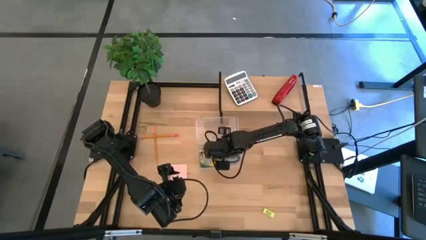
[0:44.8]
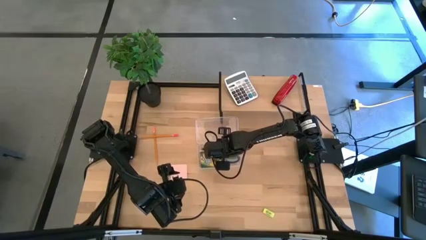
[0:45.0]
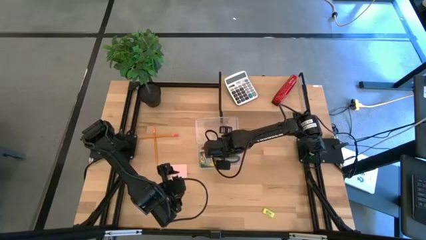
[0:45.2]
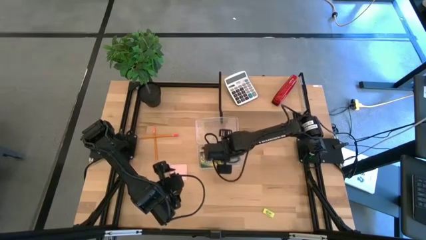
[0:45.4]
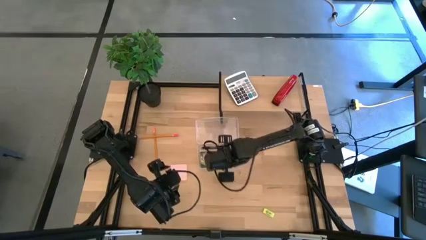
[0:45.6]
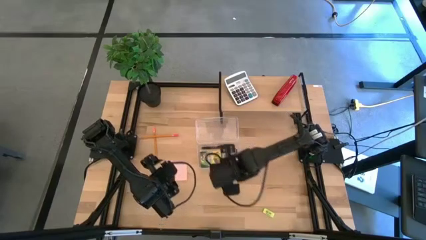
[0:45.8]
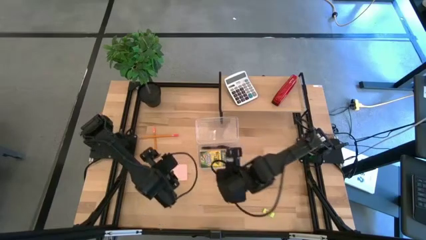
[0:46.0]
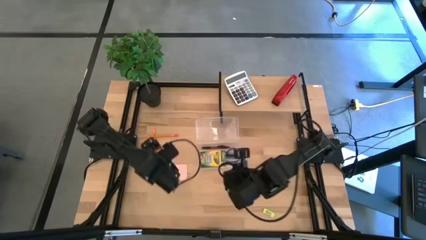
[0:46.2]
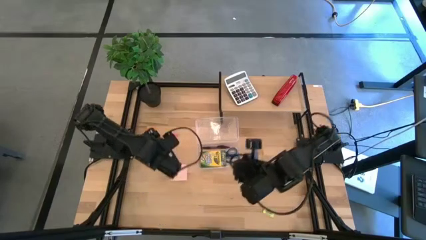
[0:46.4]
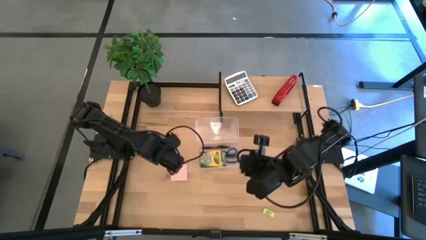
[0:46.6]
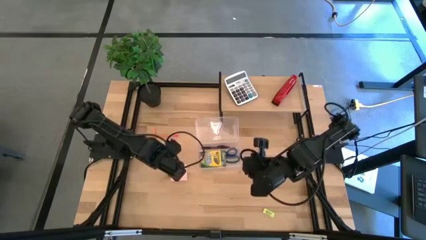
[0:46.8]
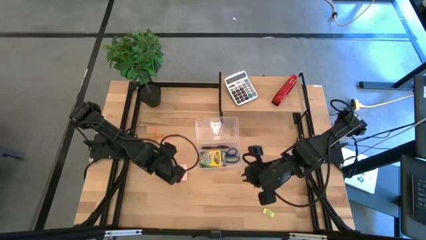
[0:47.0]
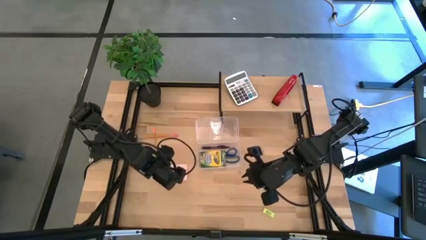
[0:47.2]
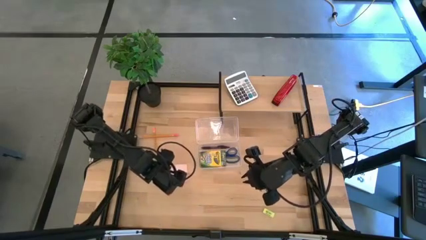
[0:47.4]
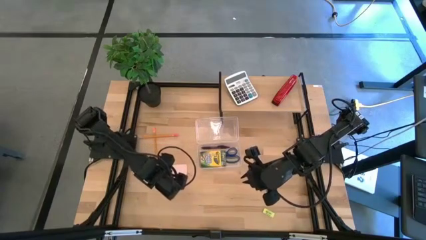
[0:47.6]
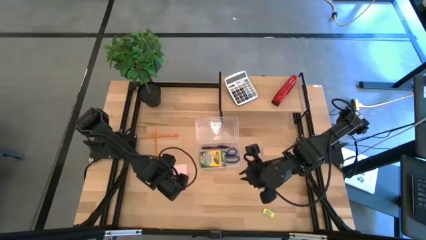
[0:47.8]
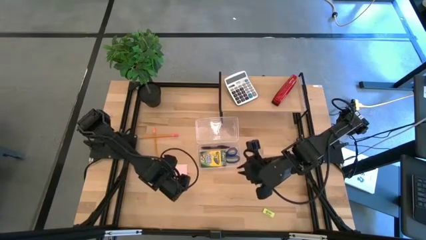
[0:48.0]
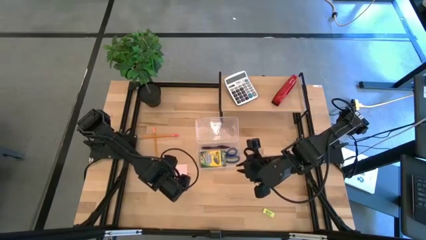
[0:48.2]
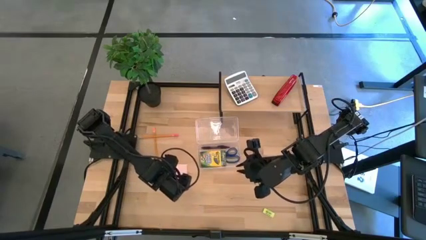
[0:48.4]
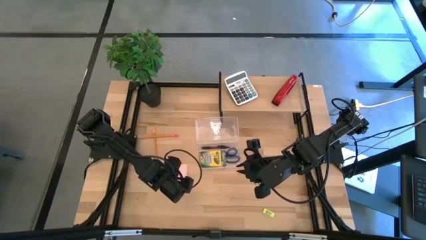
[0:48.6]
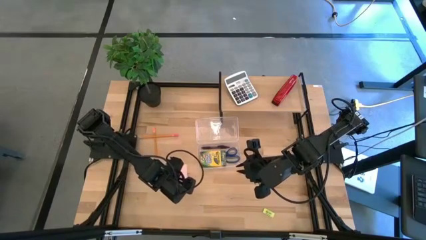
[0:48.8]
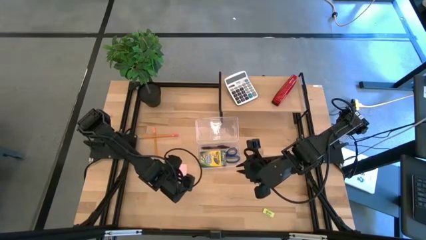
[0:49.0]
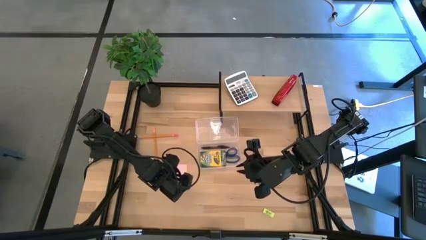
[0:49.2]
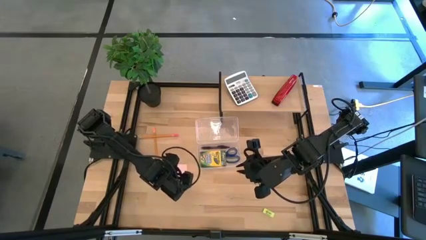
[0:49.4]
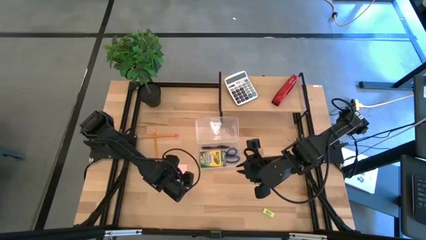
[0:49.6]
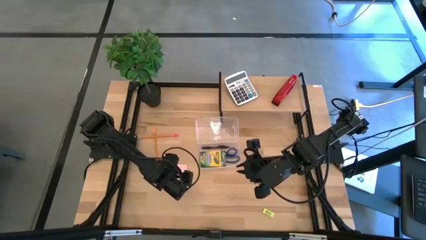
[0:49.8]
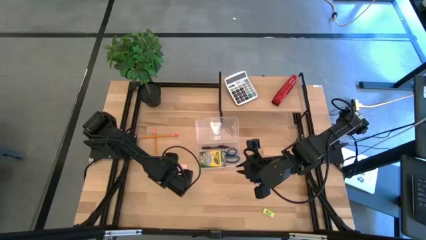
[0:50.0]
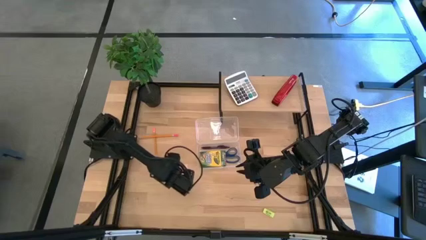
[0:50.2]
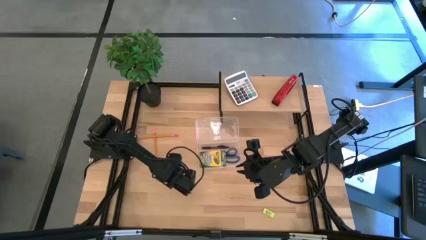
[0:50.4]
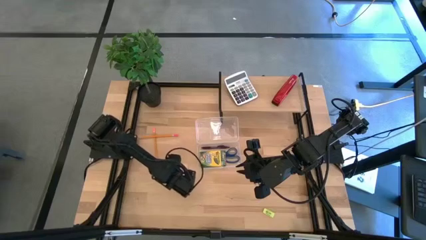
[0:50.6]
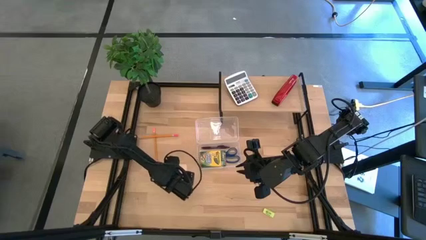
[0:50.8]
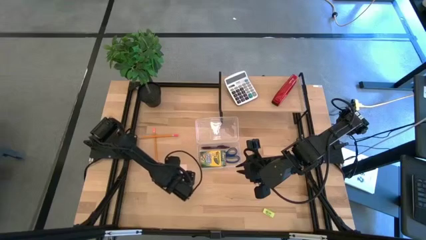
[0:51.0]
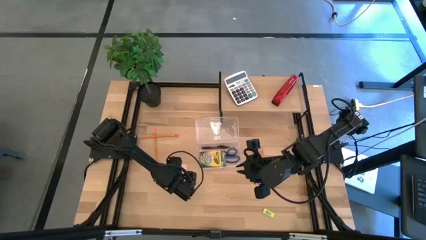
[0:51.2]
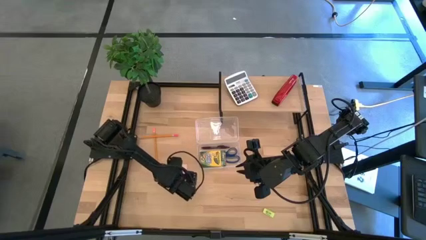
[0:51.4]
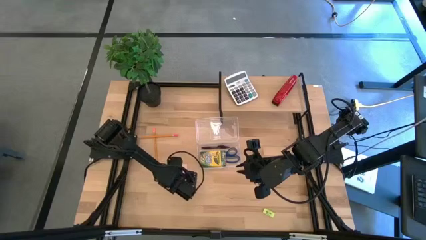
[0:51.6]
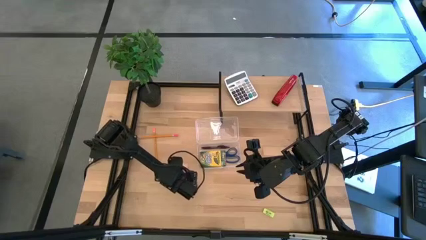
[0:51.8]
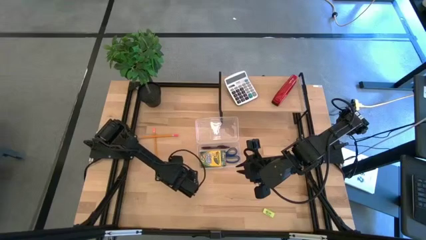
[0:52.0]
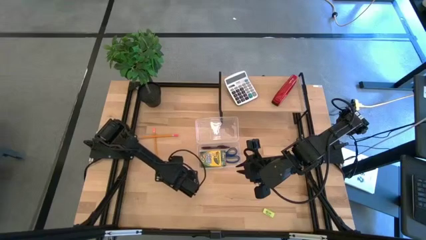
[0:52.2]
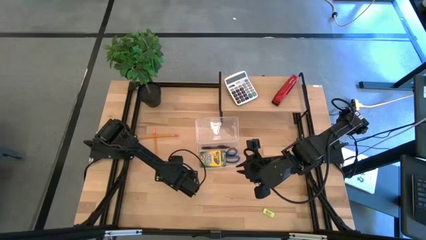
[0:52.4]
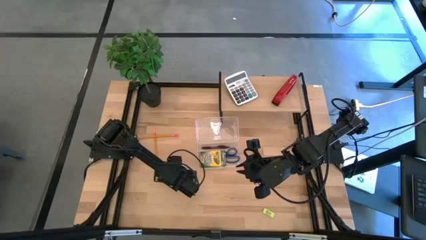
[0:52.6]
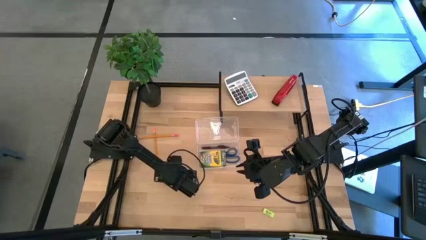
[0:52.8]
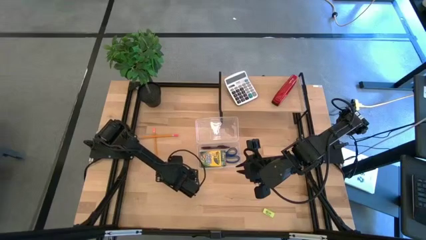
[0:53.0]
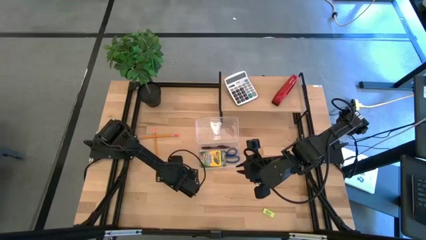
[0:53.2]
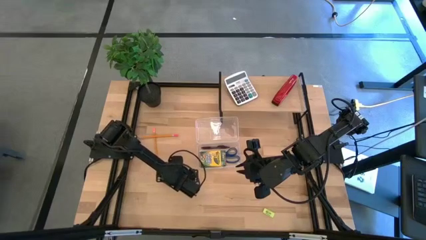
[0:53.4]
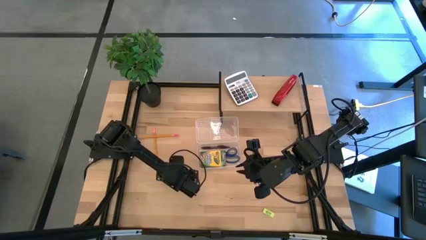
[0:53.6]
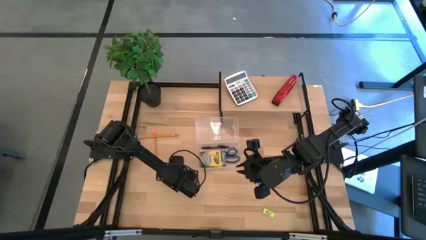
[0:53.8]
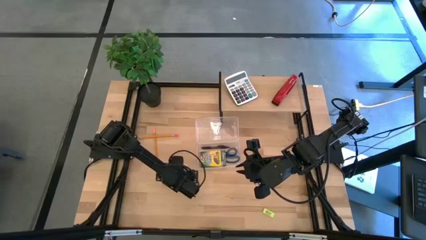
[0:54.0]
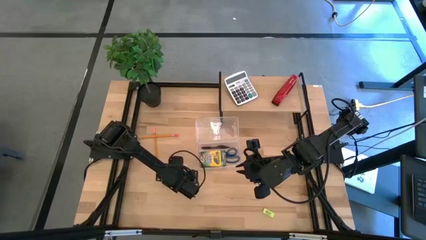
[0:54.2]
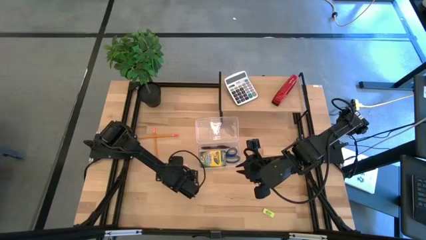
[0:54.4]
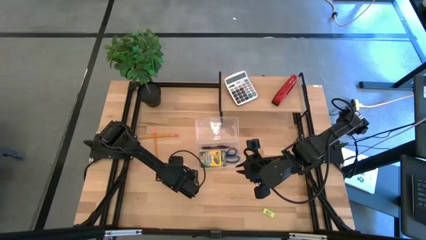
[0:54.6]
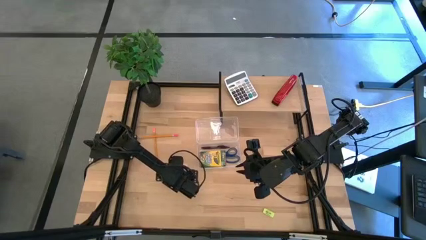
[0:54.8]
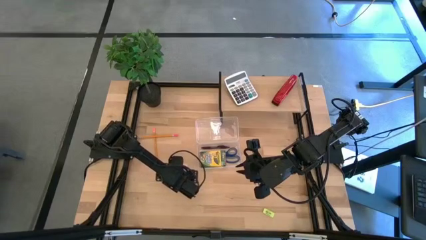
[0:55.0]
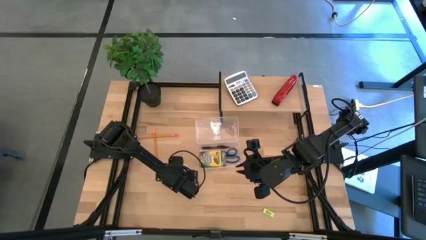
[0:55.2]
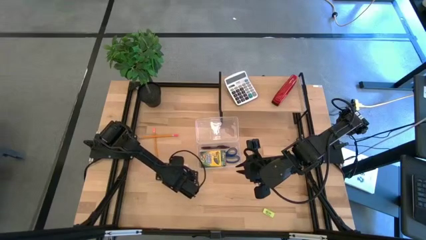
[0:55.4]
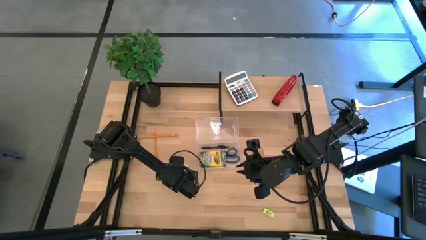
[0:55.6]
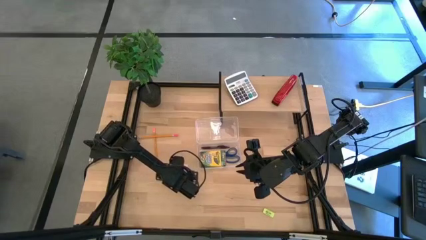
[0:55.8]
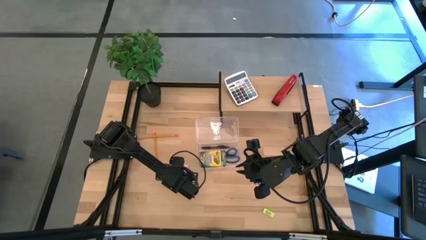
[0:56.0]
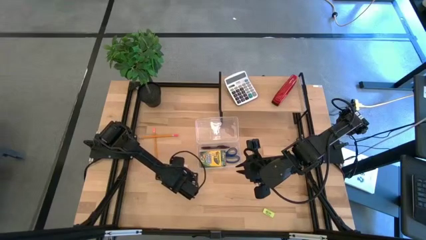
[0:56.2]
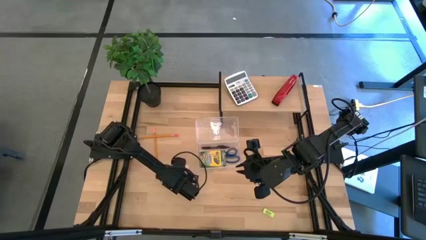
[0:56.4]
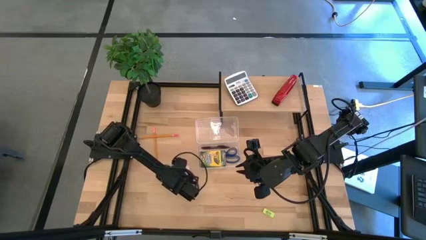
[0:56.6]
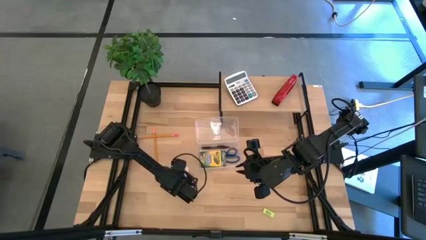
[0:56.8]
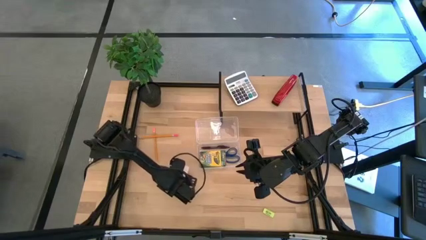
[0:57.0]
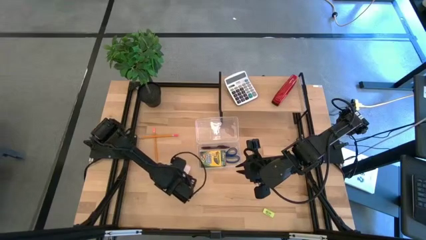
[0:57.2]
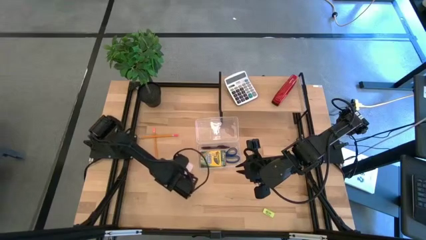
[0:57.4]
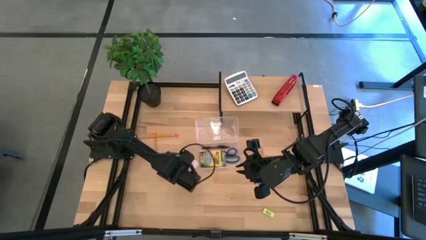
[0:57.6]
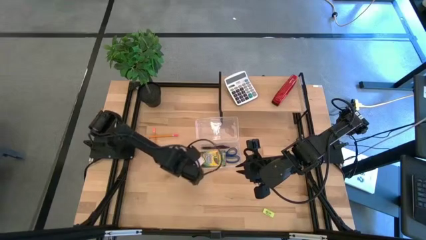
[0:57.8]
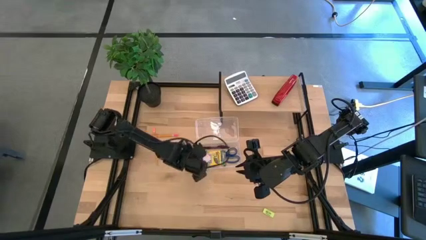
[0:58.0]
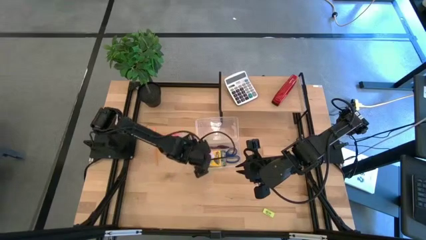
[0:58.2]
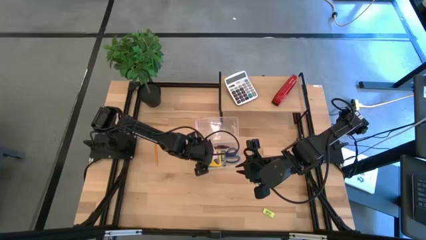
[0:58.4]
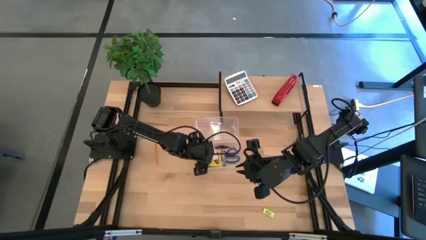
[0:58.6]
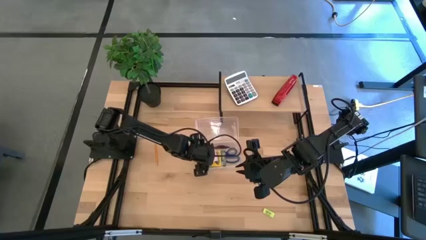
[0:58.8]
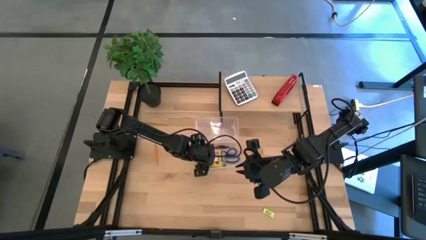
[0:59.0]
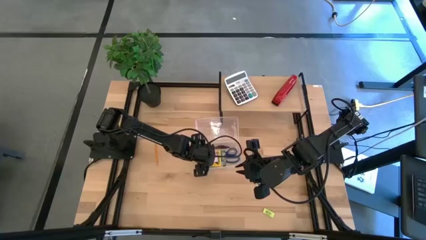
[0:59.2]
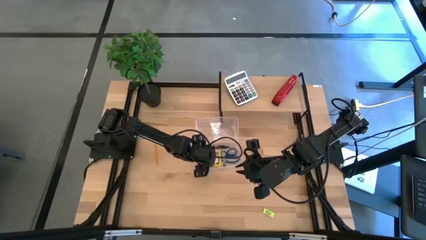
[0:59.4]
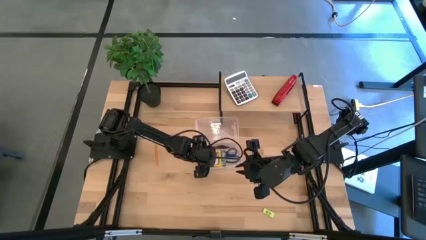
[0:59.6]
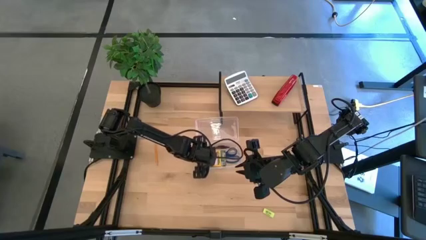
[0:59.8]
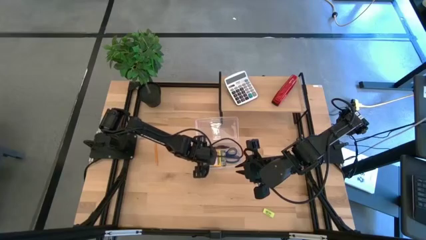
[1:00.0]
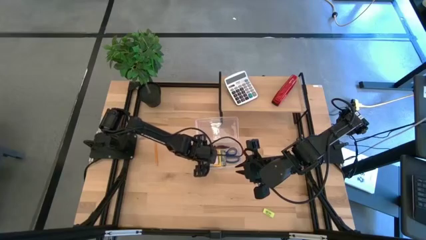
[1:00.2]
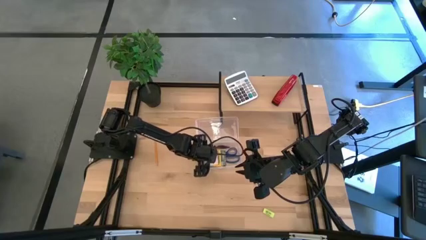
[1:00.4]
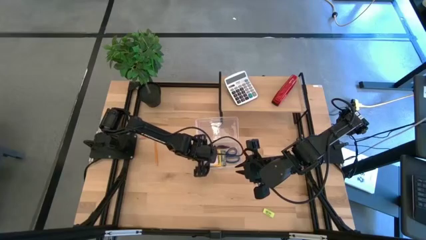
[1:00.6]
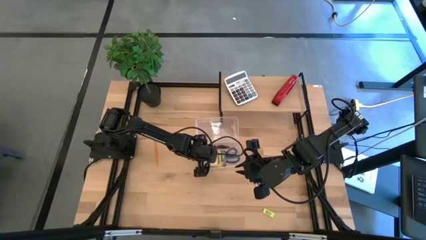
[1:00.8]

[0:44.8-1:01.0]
Task: Pack school essentials
Put the pink sticky notes into the transparent supply box
